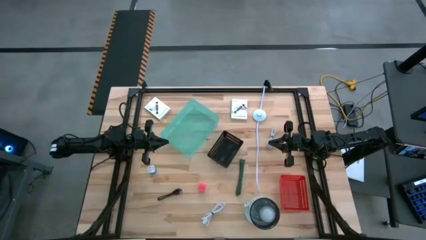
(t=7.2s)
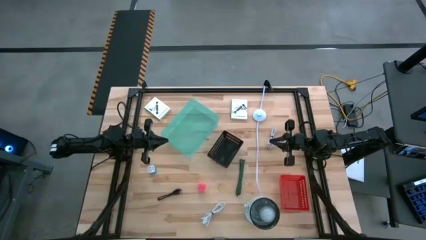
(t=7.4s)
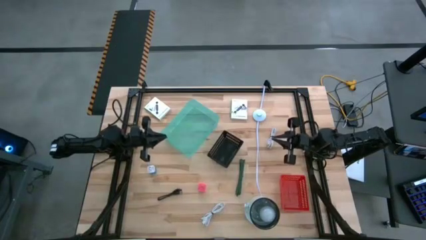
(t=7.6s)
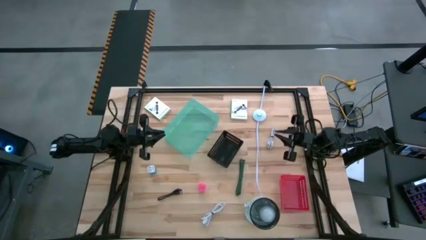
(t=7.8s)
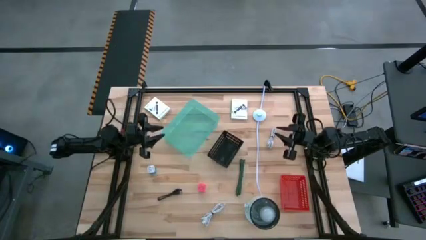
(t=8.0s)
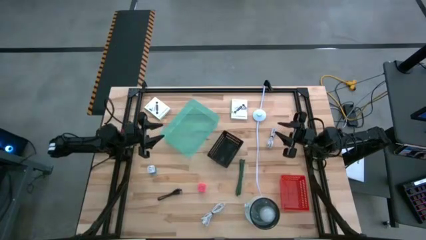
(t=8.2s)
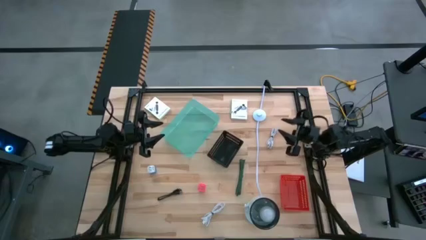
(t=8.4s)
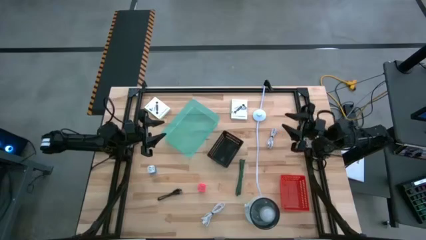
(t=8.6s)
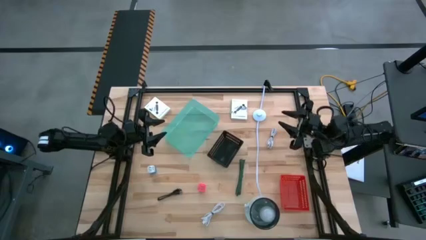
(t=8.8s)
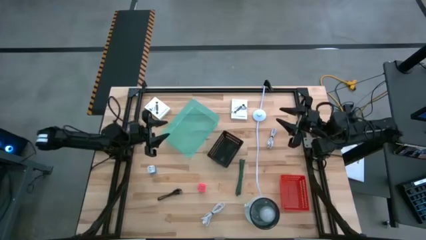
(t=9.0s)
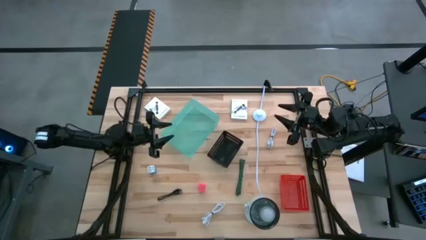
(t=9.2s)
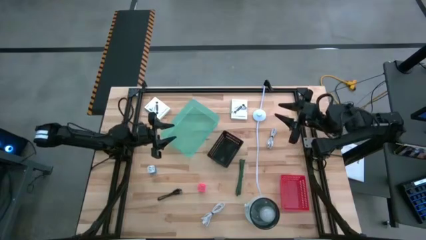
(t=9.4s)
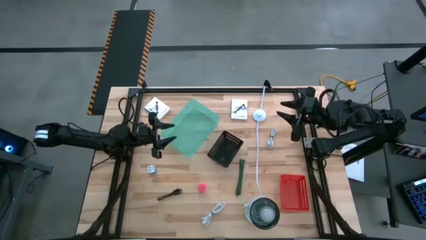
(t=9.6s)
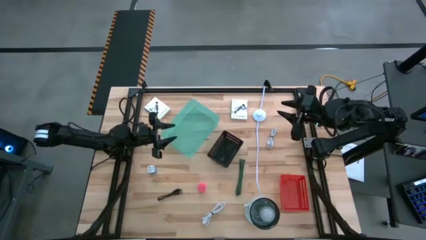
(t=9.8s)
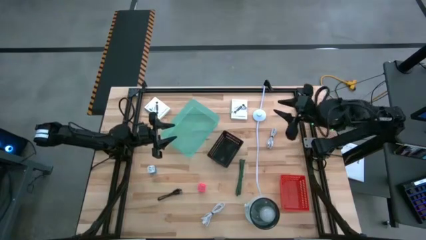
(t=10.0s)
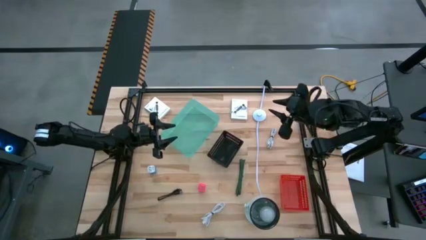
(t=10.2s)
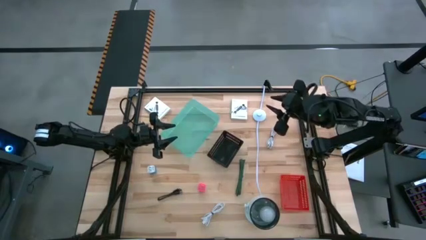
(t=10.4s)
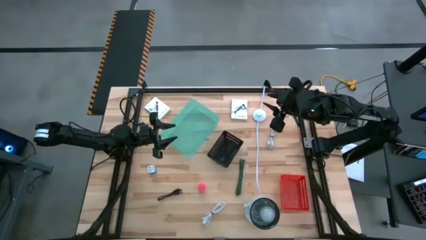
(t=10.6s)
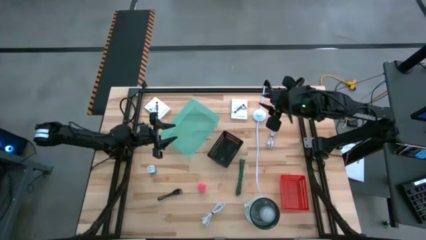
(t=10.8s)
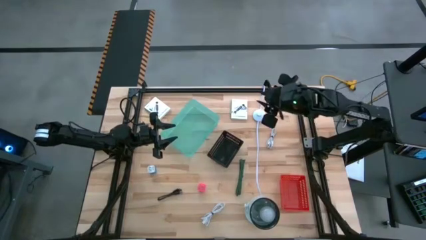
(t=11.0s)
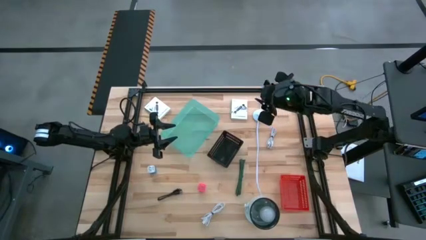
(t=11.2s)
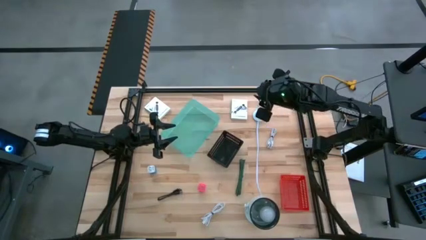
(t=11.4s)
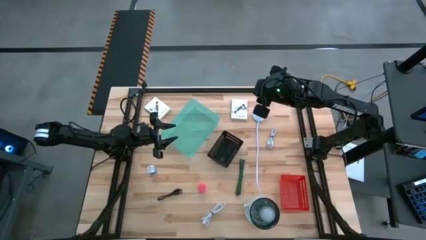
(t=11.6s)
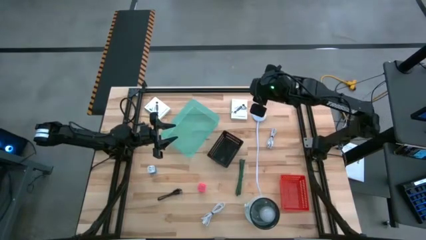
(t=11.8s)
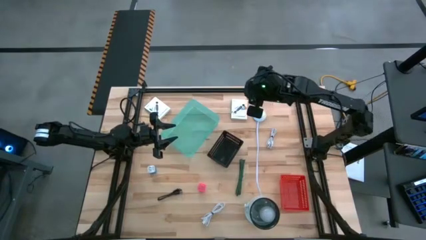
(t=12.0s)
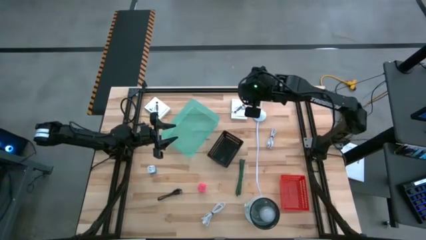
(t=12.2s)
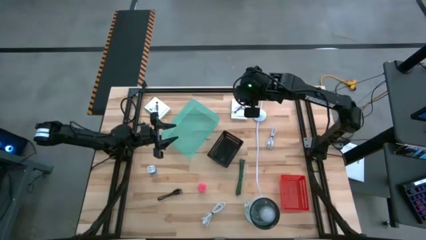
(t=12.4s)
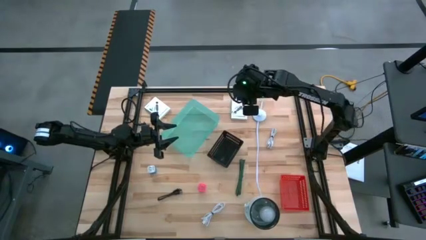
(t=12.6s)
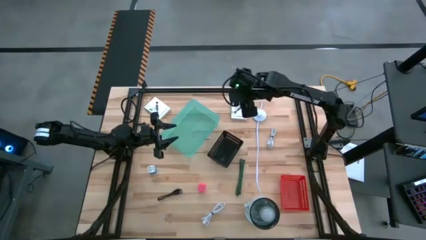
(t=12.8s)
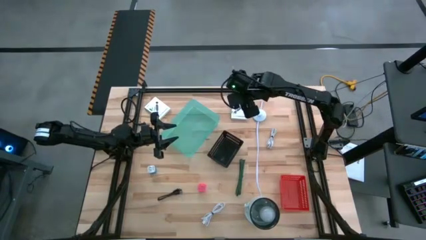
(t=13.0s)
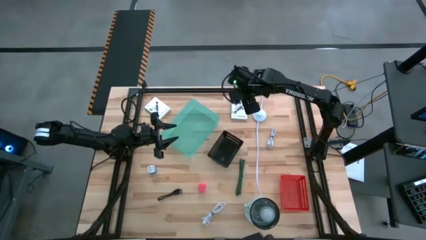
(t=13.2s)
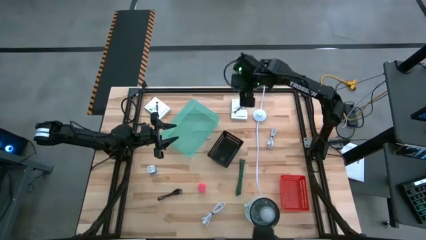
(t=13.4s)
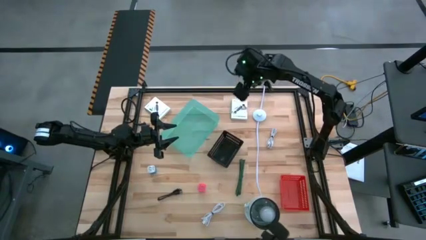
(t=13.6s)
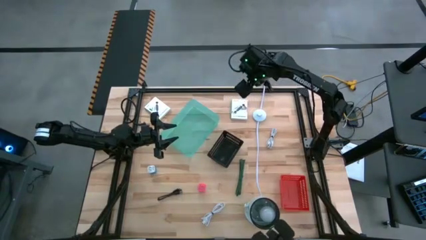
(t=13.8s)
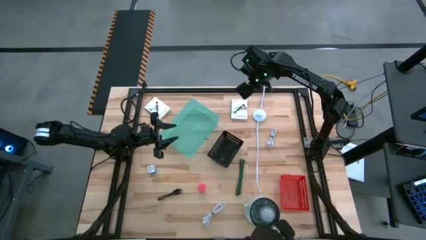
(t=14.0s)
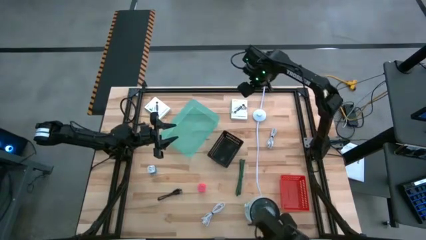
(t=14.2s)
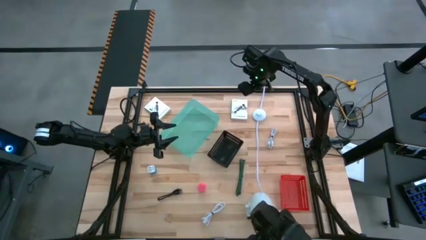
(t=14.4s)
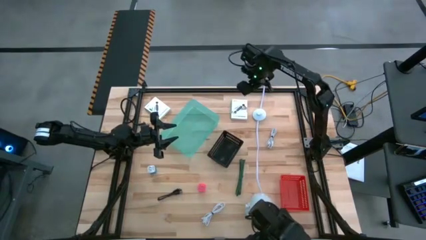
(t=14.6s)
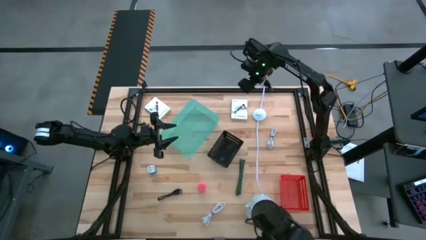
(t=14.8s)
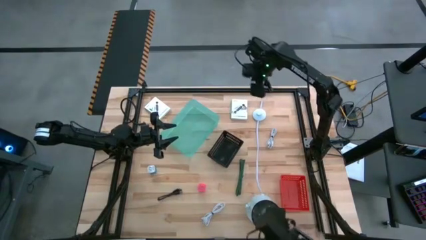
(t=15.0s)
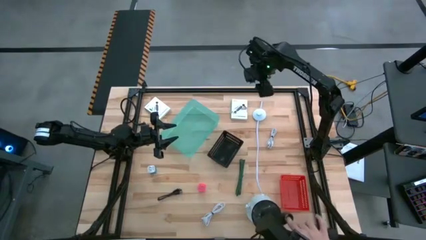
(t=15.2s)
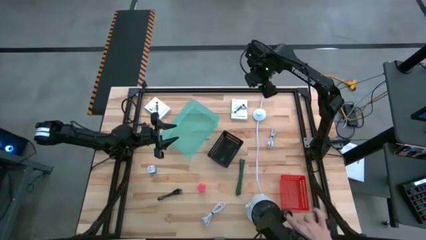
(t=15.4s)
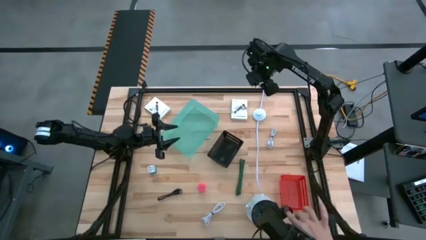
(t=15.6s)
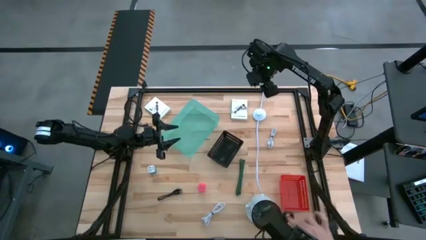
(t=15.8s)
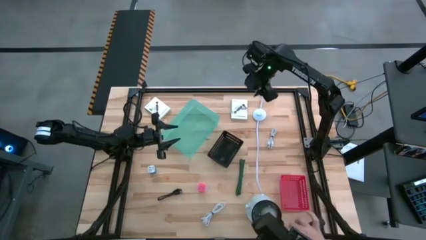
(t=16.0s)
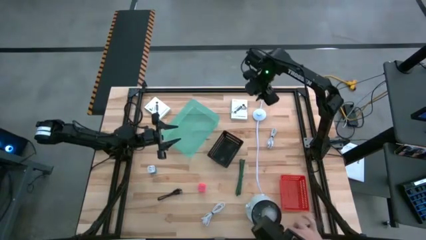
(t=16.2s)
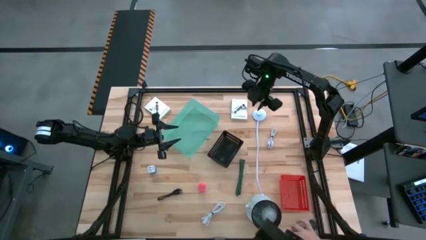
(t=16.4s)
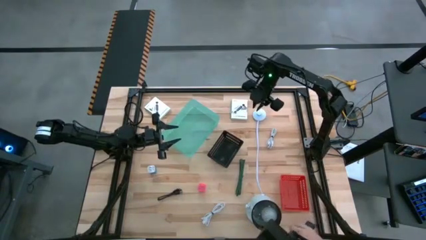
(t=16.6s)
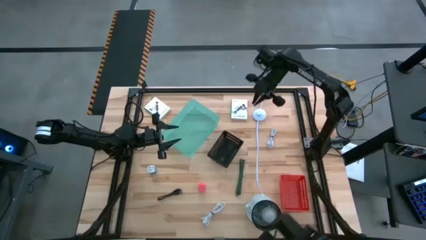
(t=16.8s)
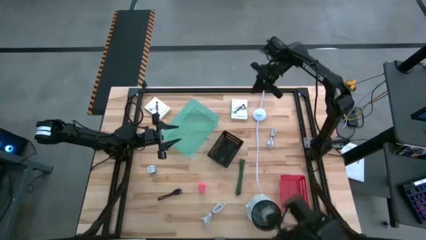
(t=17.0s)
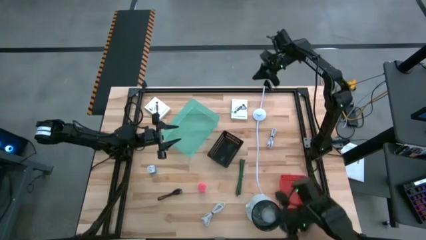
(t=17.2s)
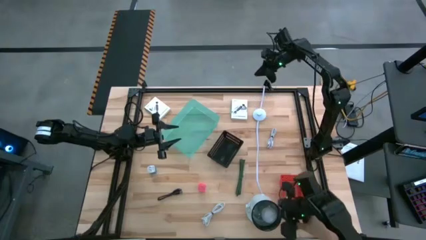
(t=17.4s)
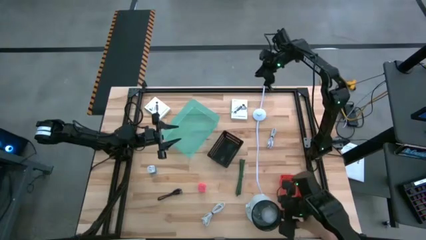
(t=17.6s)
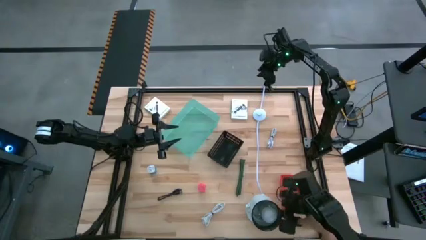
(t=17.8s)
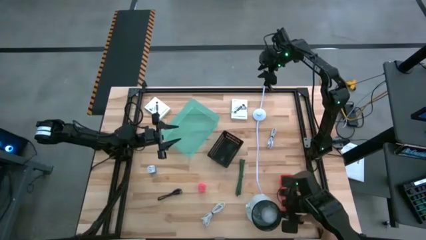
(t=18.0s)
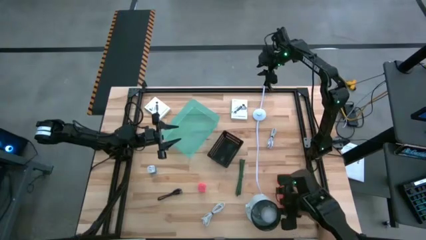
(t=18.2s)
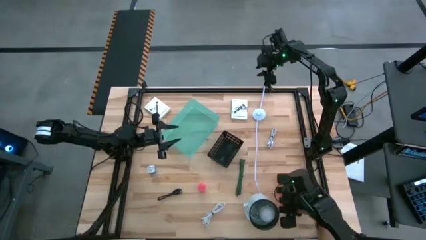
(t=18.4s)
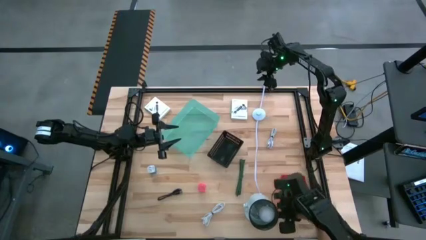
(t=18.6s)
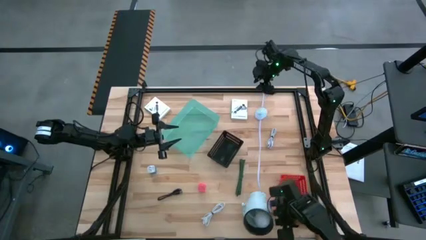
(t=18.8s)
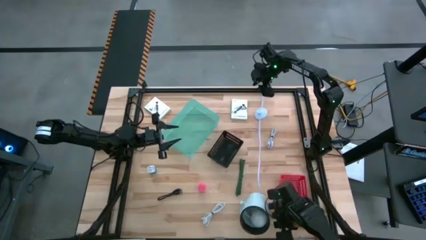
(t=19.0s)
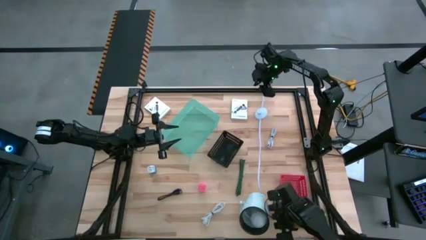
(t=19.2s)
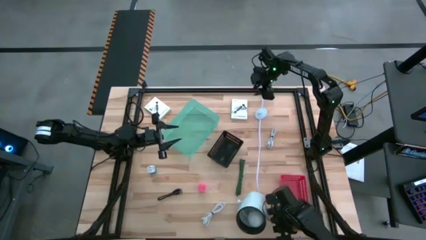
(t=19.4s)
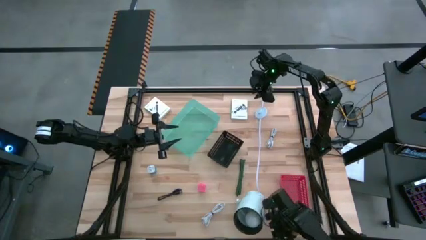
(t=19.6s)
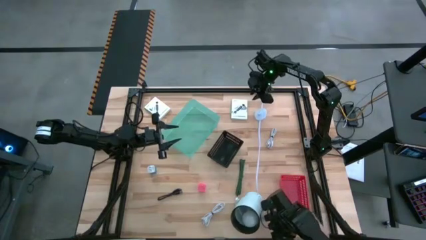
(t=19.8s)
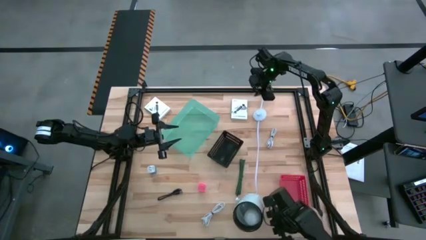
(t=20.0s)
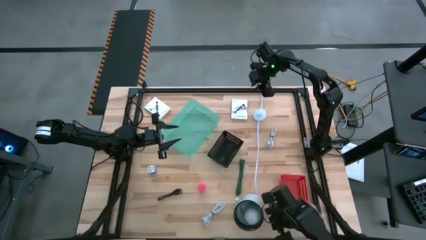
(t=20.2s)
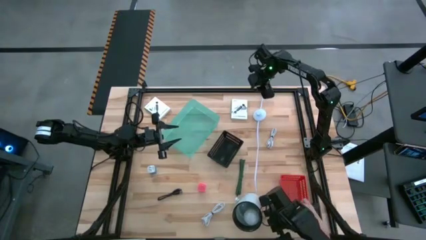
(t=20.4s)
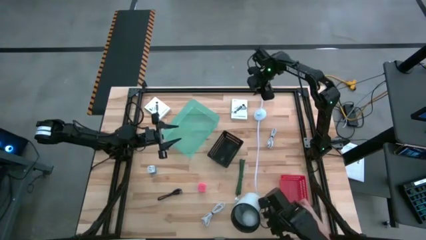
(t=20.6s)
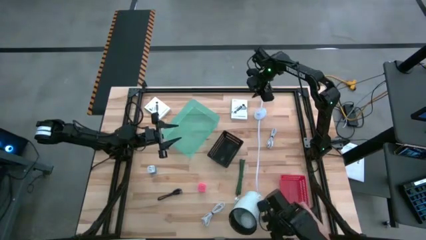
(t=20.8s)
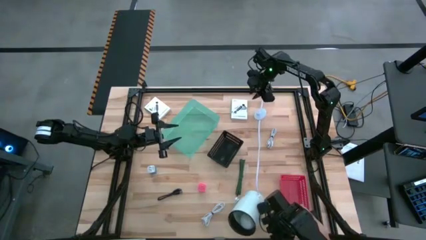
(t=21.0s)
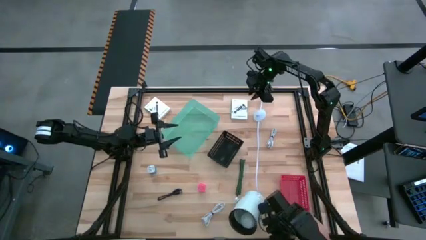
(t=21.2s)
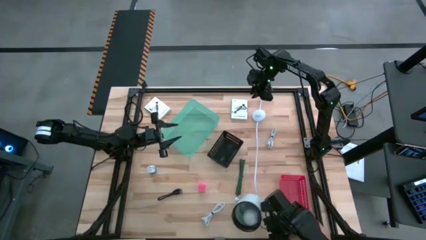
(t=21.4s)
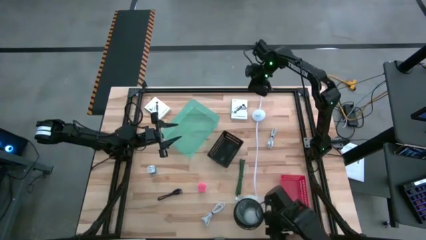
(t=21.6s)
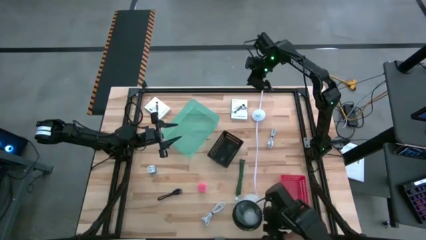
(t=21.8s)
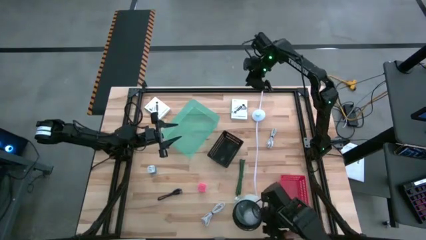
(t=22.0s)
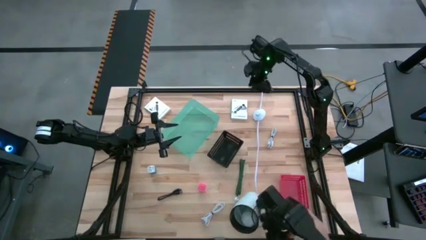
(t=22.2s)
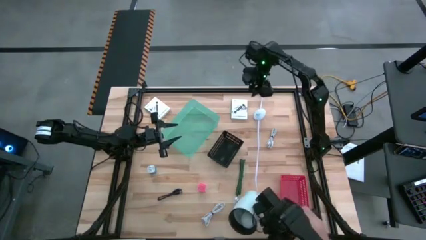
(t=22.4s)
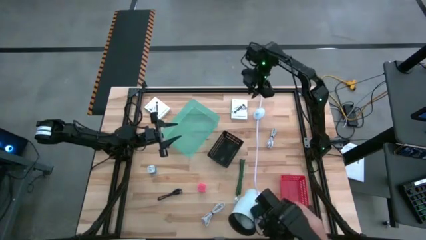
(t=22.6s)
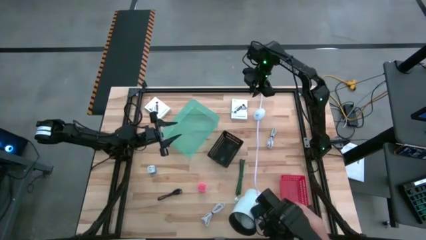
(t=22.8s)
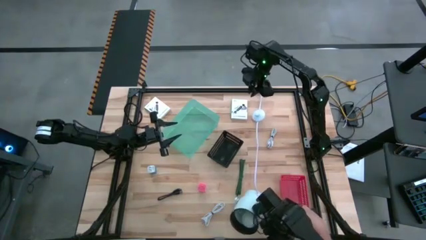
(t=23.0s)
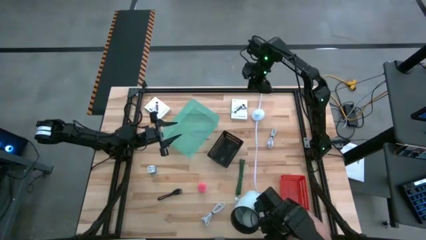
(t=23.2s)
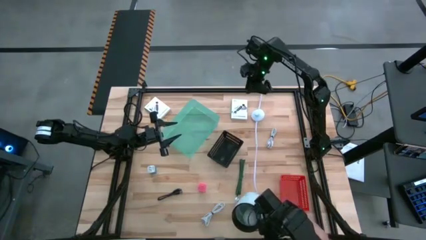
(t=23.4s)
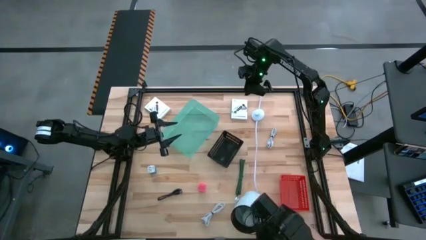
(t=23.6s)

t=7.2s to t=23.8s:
Task: Pick and place items into bin
Put the top white charger cable into the green bin
